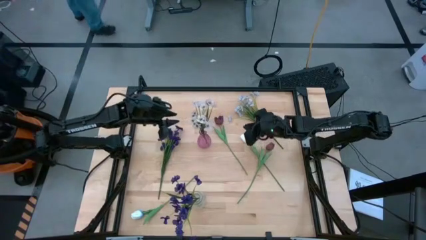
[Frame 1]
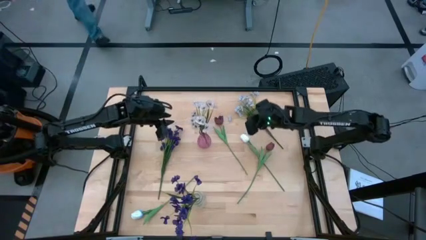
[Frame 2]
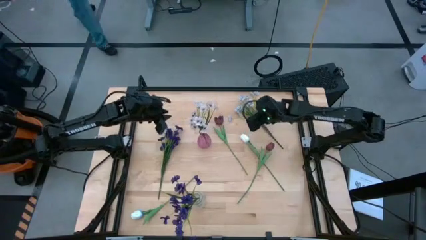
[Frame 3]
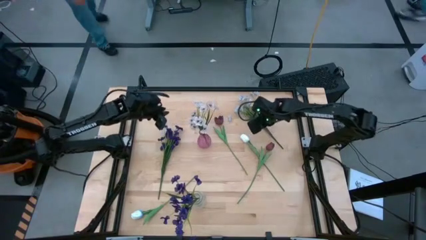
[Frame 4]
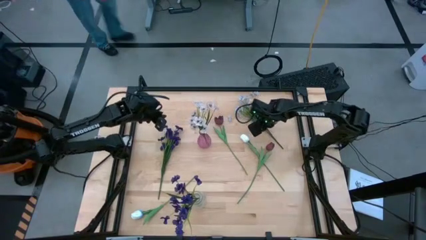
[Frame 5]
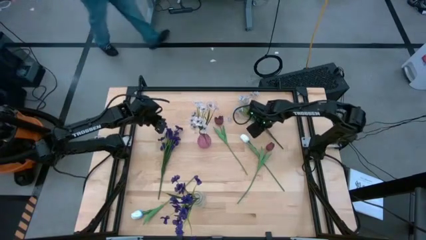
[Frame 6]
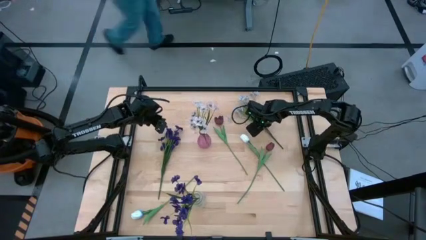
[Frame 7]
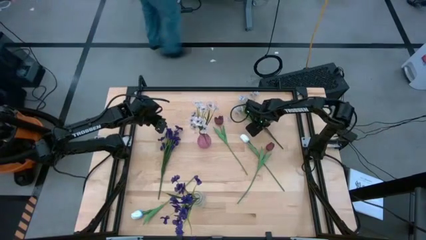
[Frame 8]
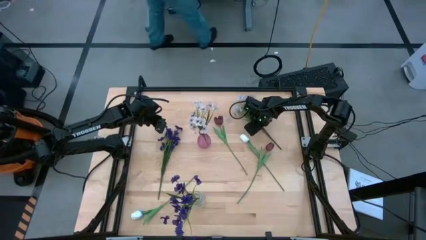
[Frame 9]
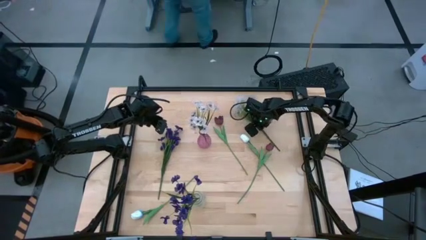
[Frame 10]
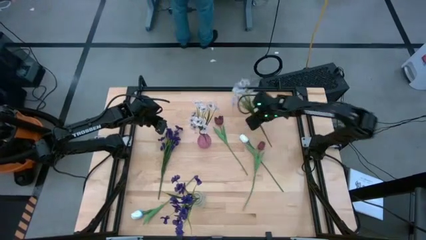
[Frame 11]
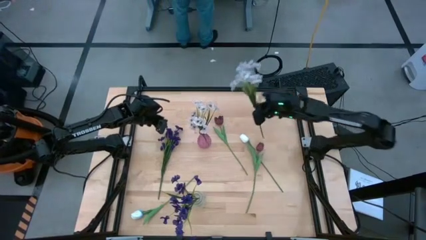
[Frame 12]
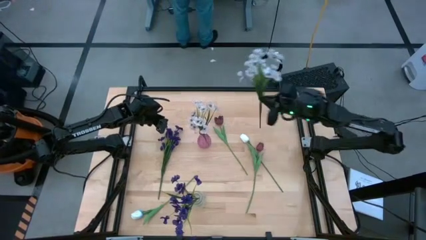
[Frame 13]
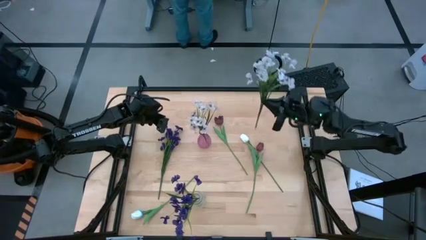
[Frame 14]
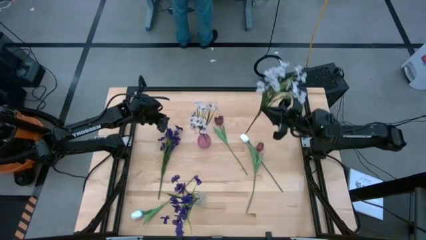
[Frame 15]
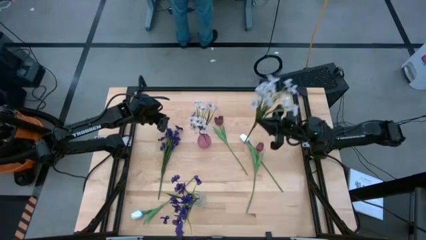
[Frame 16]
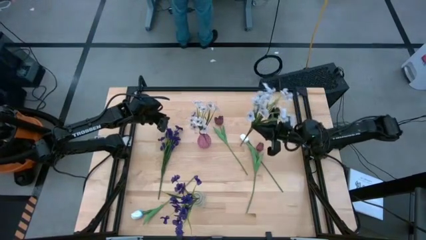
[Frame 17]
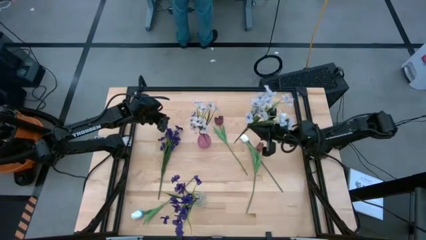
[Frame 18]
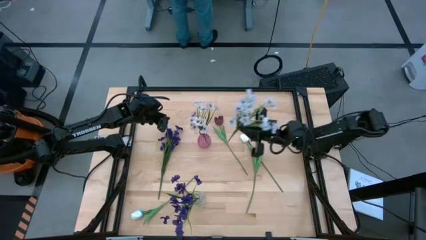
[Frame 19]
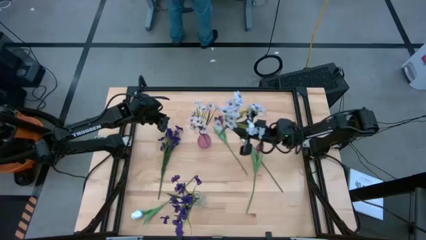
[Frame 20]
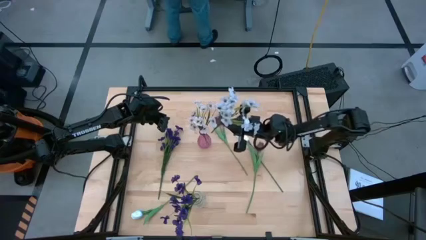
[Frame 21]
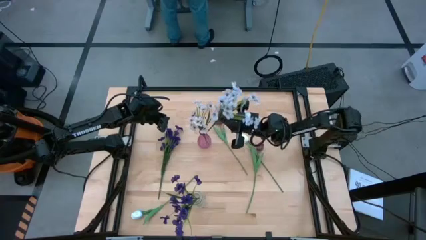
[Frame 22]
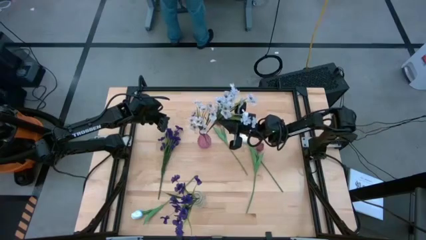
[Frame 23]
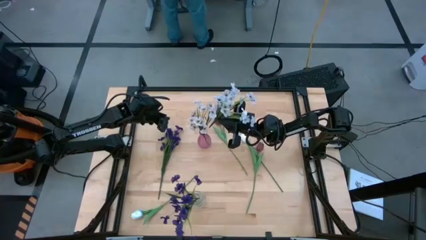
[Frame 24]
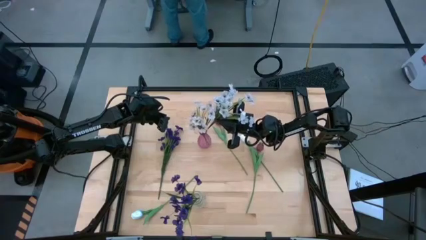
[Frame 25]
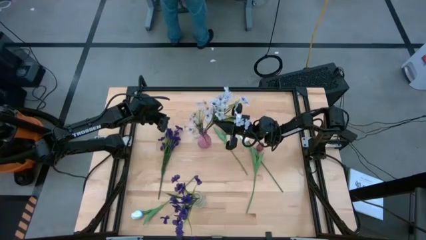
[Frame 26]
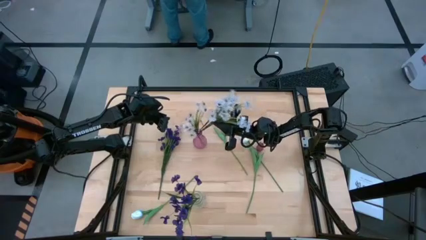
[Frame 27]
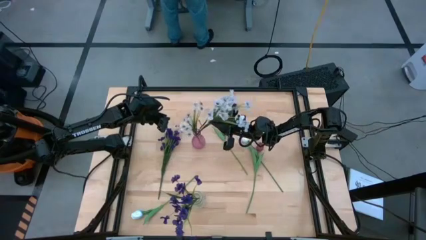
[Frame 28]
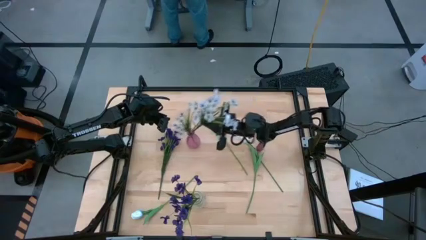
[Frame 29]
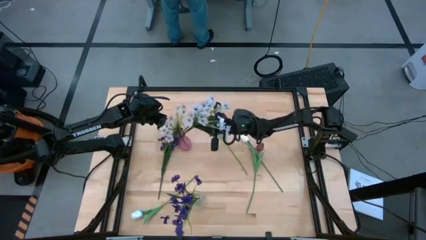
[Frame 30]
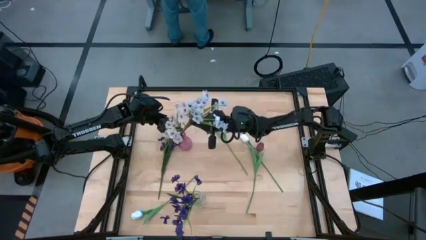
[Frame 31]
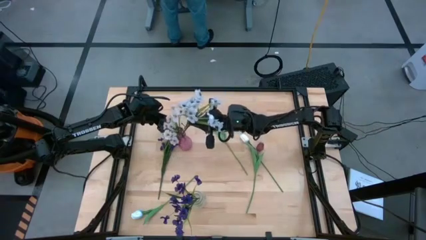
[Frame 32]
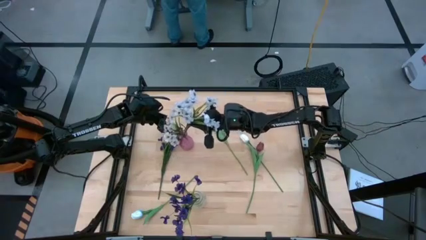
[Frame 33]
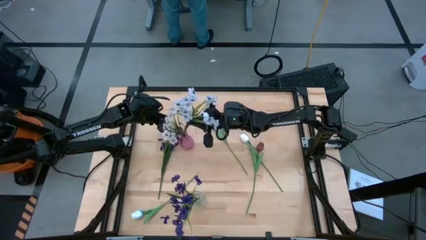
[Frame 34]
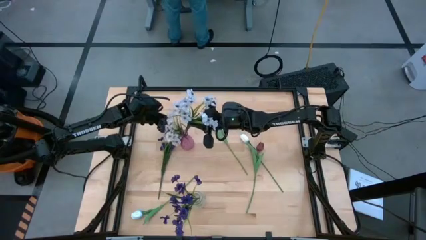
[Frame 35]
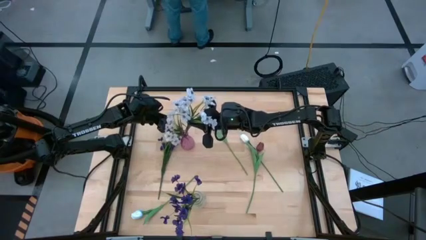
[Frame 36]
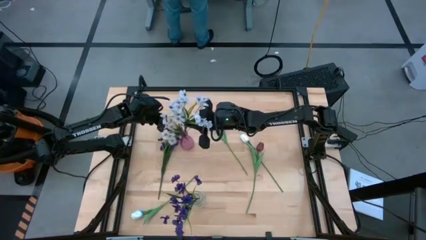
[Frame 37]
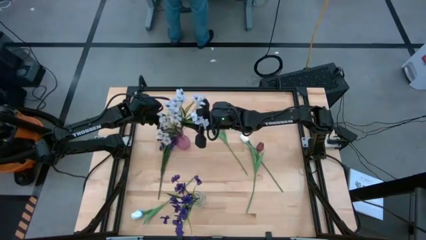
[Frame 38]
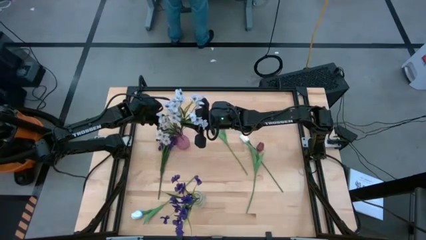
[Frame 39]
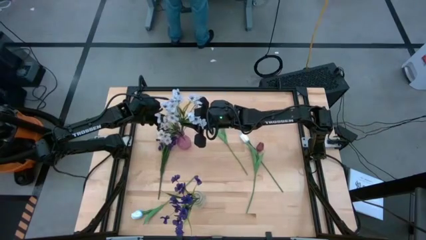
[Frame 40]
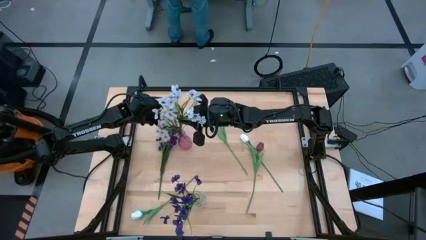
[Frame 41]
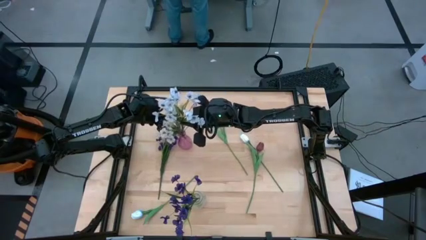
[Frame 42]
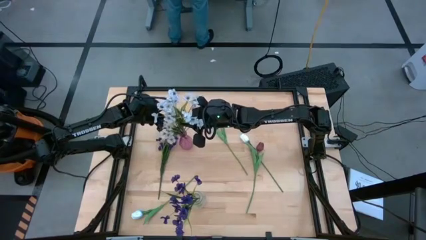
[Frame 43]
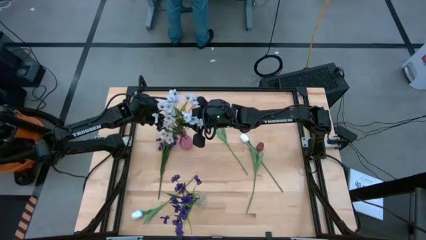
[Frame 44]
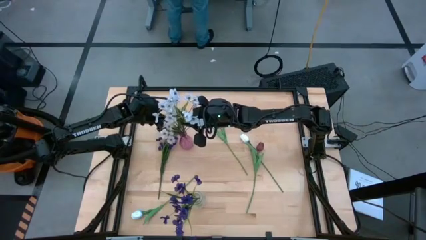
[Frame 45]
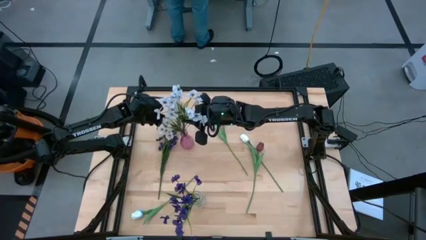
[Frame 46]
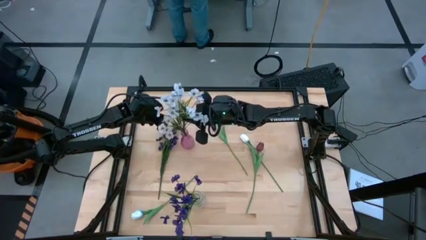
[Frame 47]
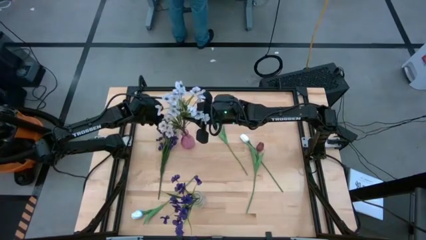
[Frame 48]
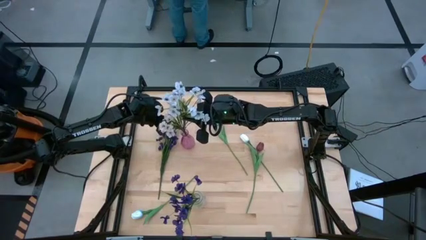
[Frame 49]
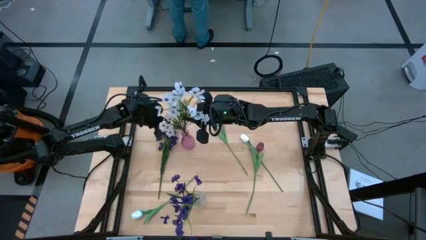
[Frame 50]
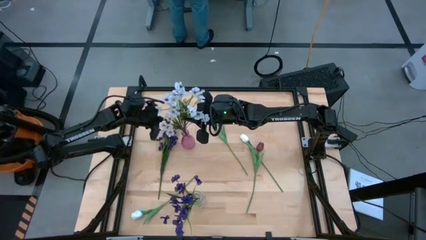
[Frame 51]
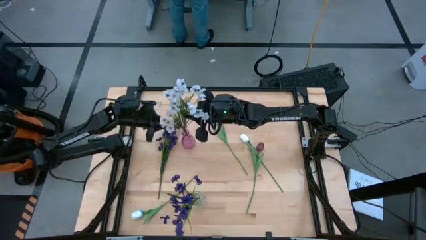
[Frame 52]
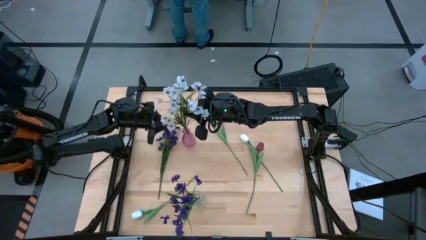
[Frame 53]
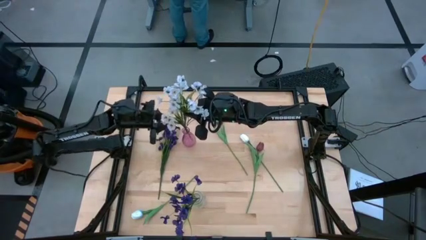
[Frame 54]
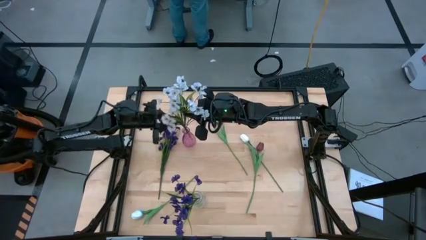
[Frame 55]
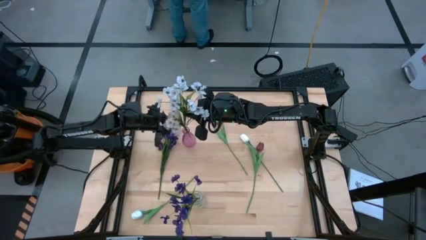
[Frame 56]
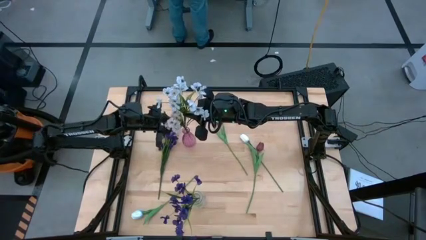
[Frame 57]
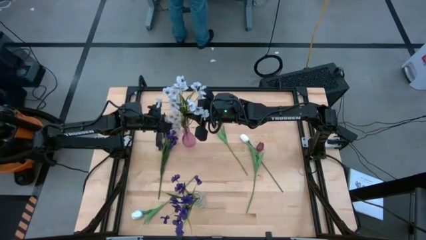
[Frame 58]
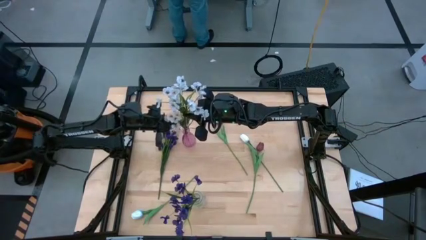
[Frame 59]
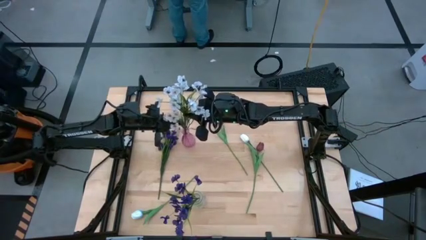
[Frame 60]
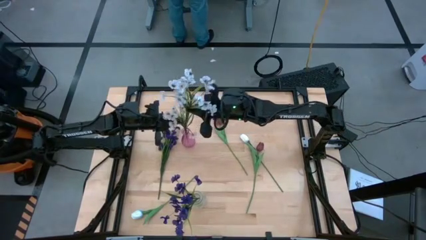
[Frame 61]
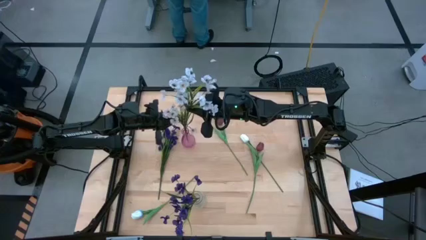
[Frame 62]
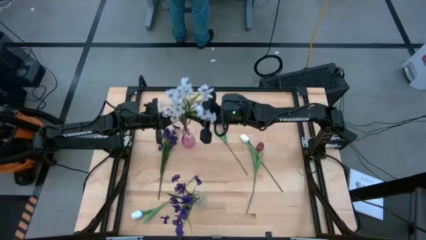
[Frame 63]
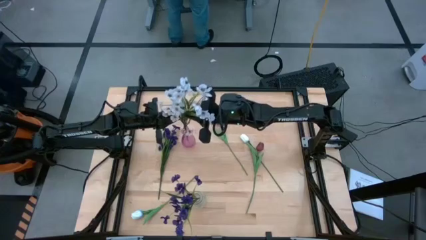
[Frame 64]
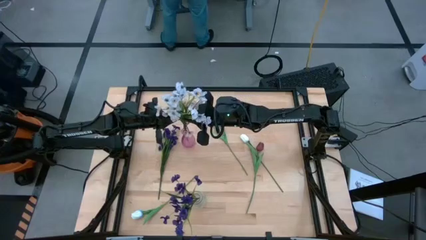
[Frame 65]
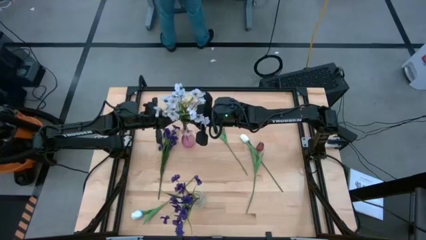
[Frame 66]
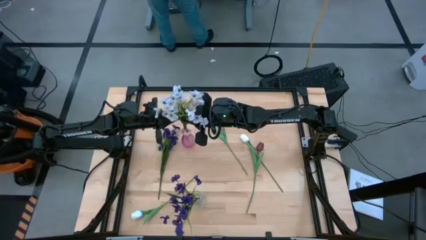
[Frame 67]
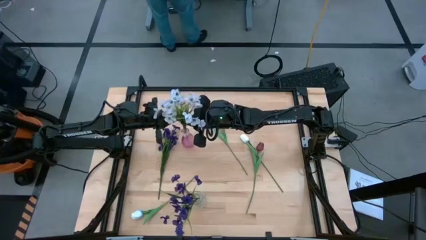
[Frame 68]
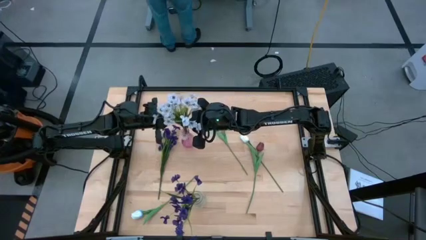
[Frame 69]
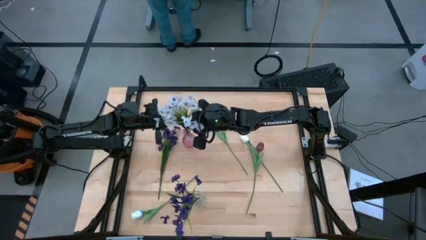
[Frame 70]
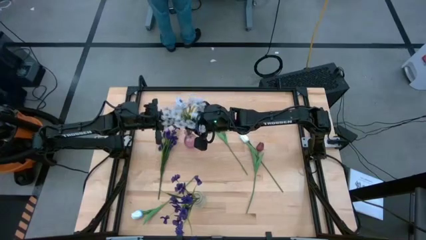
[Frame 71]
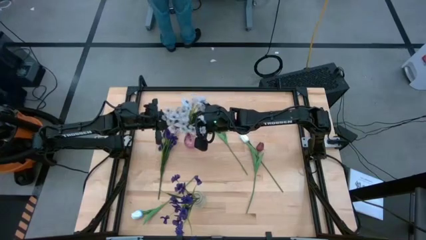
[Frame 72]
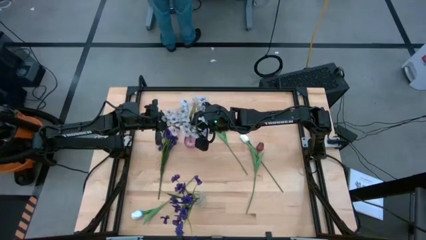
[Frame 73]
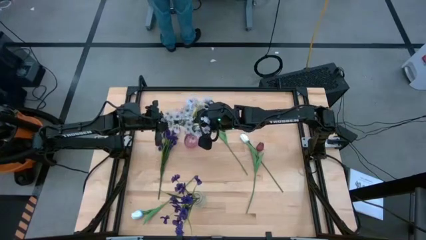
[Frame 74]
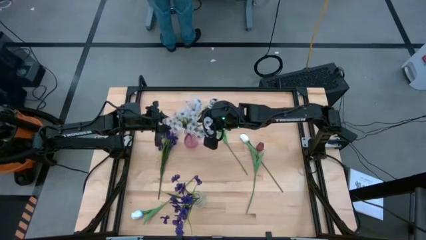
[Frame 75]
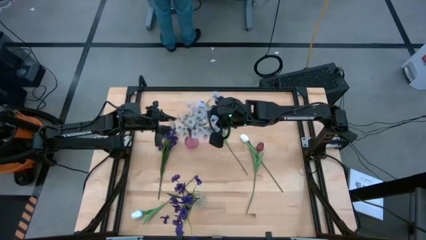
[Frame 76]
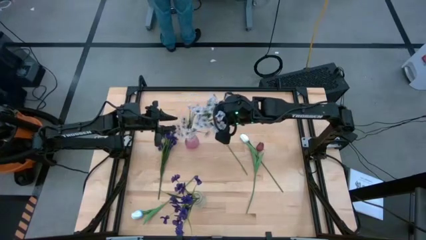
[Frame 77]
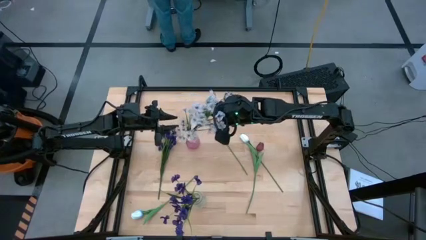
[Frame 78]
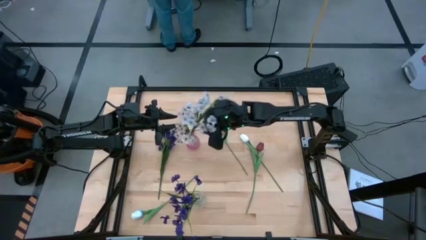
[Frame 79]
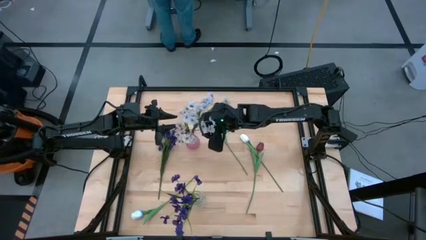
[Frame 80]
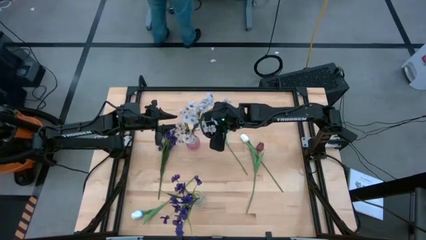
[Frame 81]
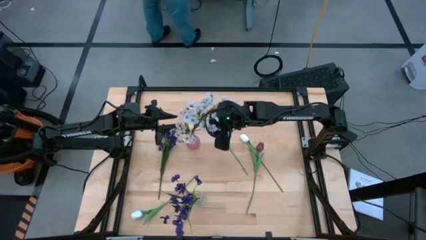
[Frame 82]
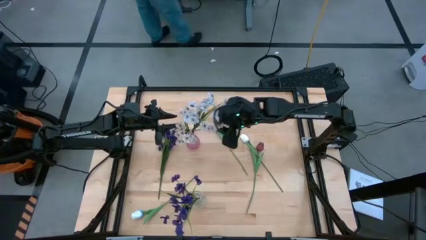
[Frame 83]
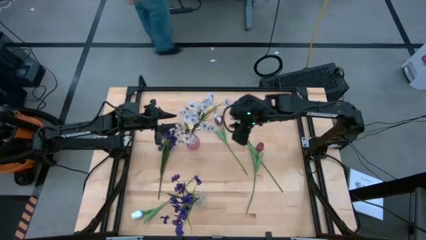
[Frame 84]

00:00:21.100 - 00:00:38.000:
Task: Sort flowers into vase by color
Put the white flowers into the pink vase
